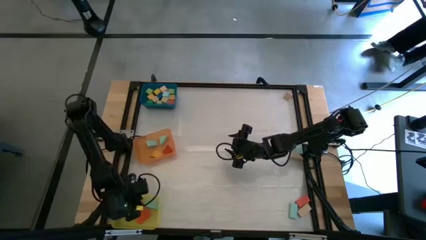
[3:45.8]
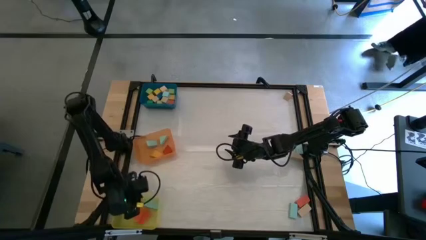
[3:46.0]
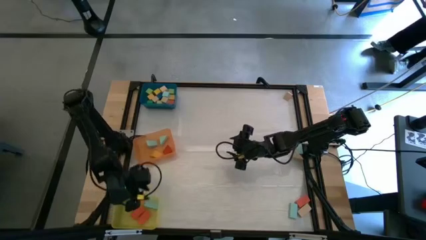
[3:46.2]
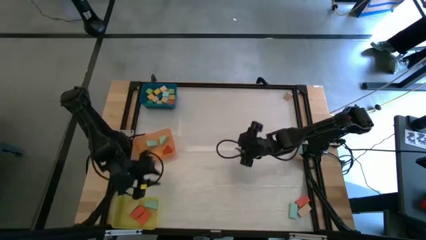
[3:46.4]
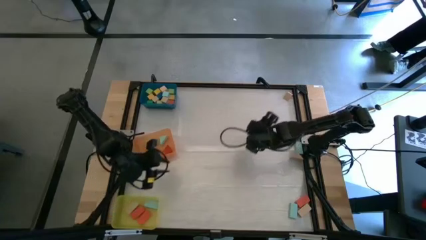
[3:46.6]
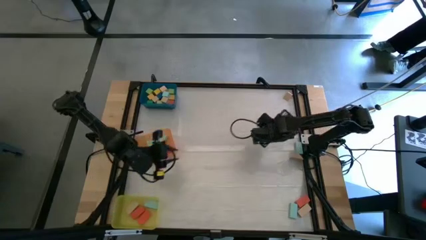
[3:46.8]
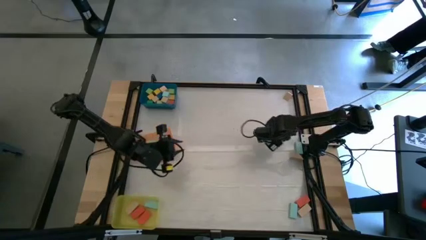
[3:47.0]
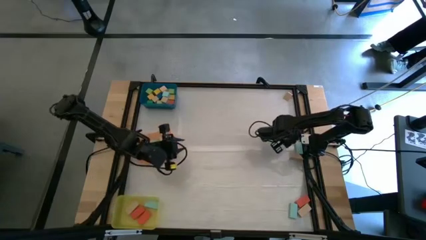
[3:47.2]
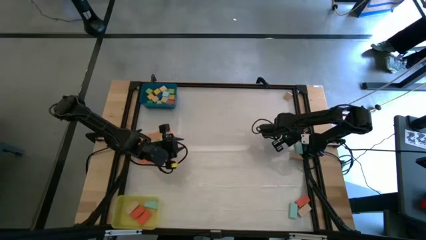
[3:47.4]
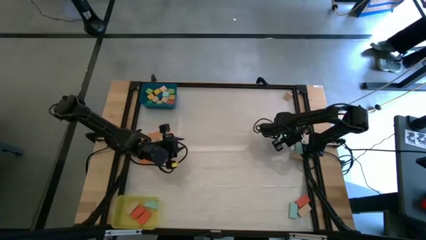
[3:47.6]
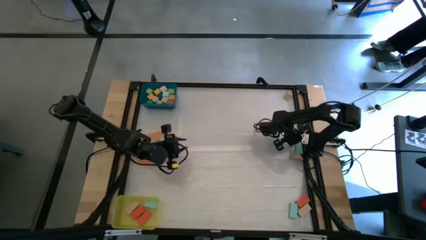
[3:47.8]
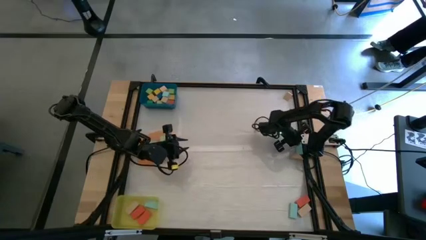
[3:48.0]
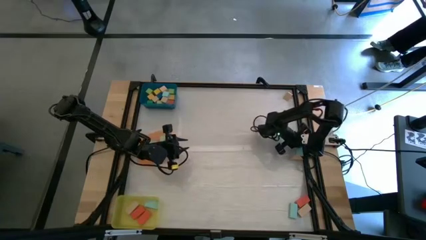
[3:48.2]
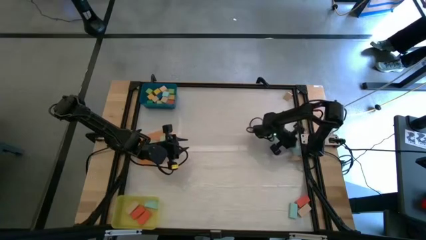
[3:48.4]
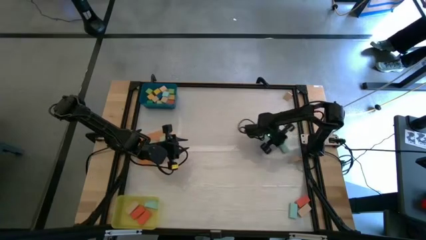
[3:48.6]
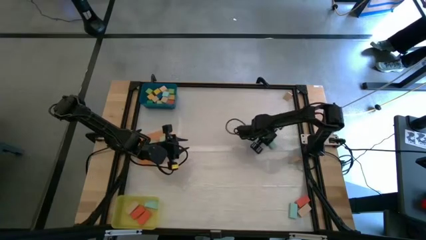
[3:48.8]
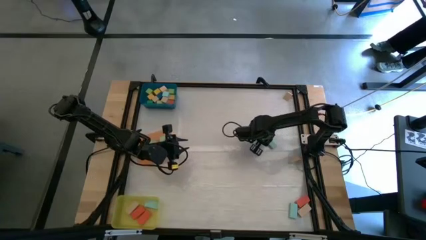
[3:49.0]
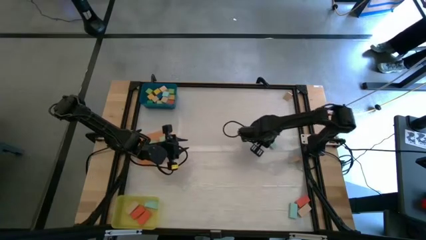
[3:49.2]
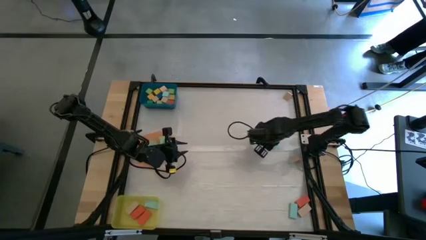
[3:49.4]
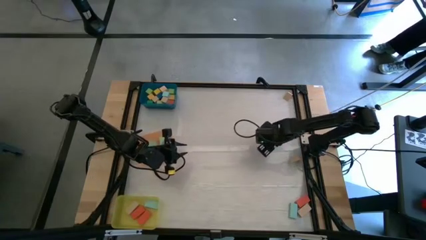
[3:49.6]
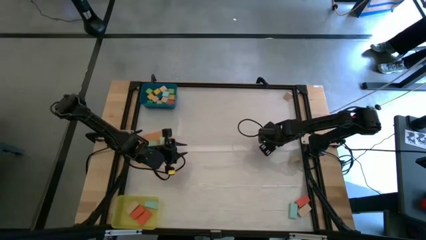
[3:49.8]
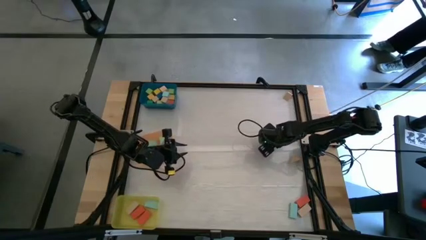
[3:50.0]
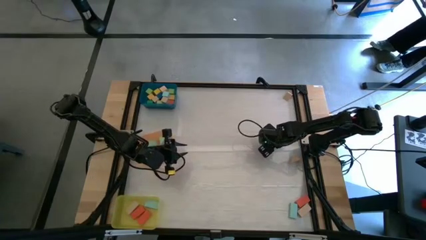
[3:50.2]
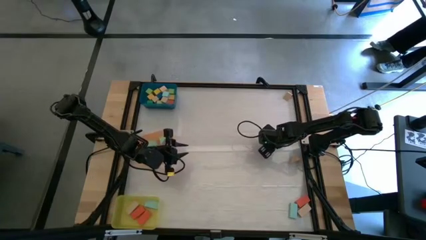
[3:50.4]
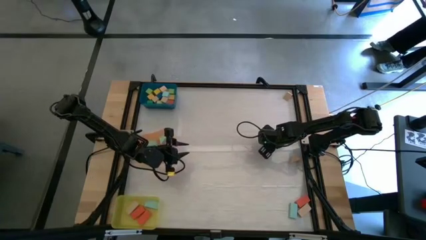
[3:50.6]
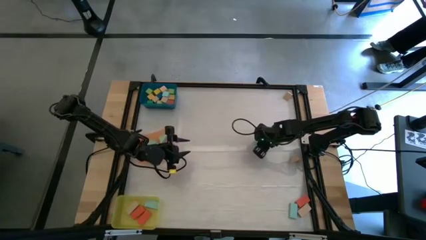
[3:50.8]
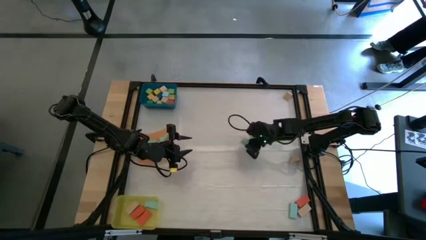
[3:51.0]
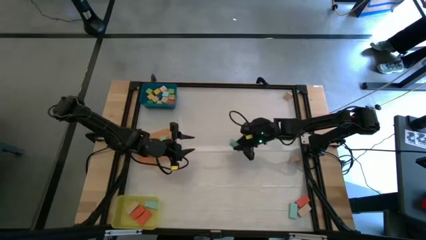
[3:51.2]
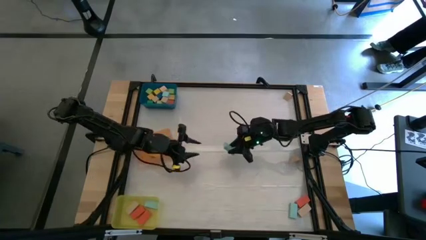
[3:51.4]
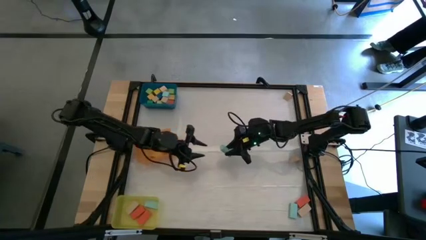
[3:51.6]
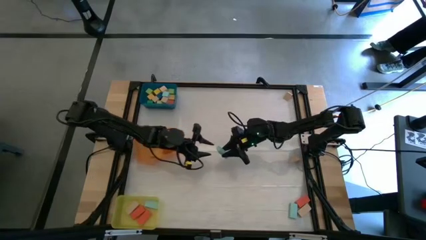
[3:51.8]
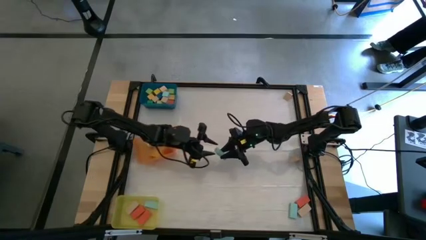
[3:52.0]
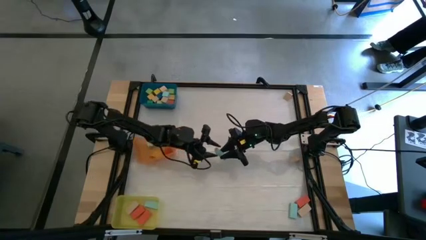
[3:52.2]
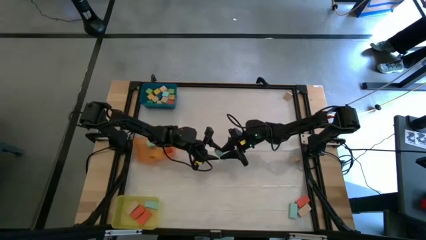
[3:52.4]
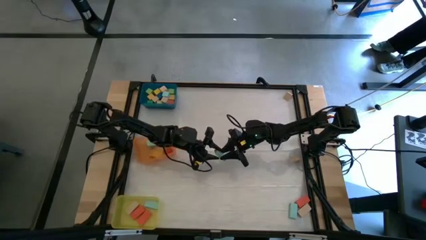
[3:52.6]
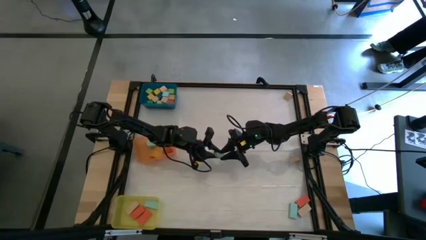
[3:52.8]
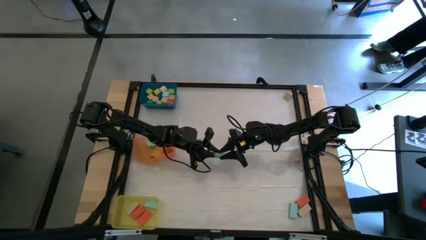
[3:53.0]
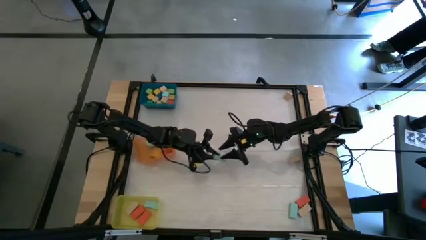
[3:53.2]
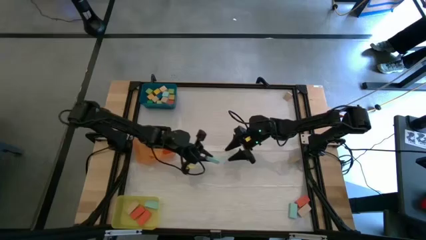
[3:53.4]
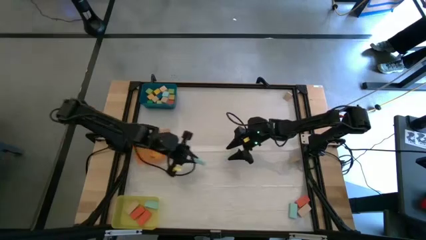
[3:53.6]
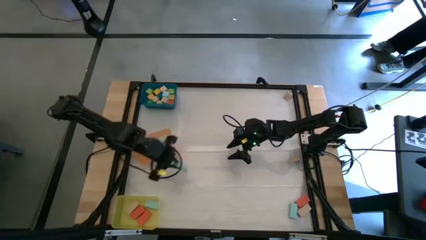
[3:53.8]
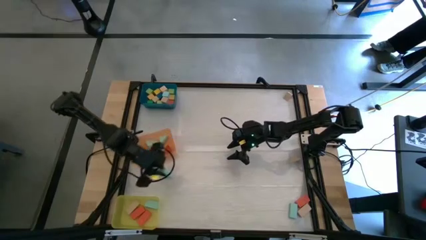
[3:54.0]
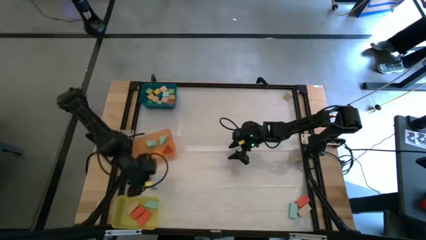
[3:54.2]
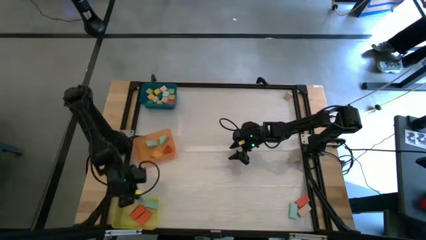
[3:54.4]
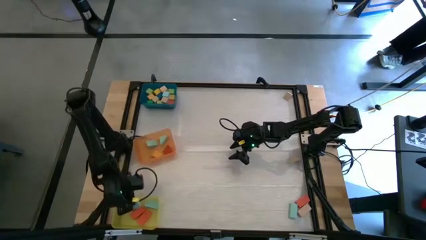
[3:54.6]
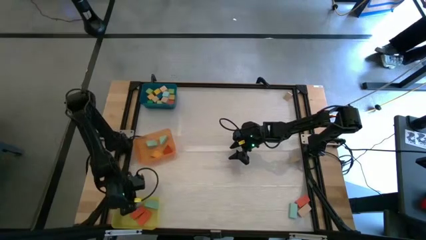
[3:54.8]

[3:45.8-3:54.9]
Task: Sort blocks by size
Put the light blue rectangular block into the yellow bin

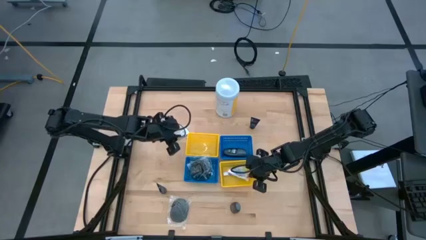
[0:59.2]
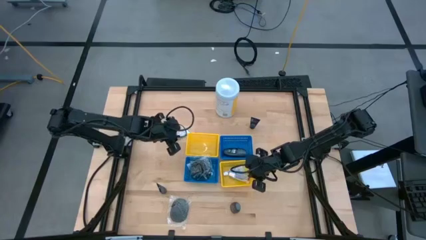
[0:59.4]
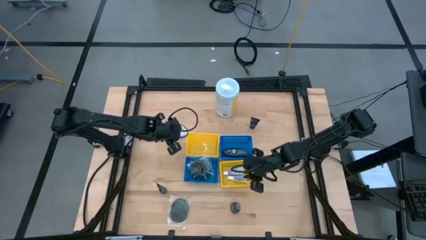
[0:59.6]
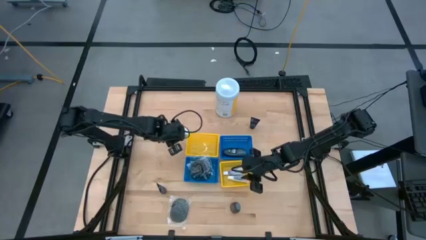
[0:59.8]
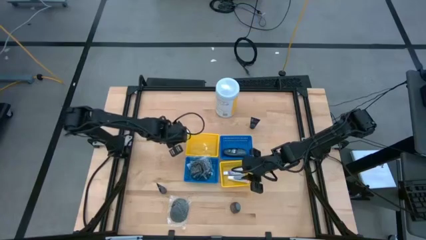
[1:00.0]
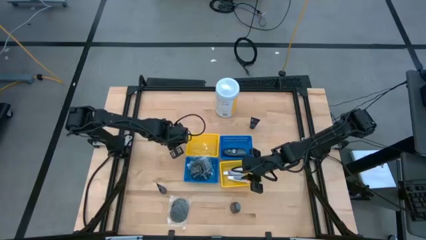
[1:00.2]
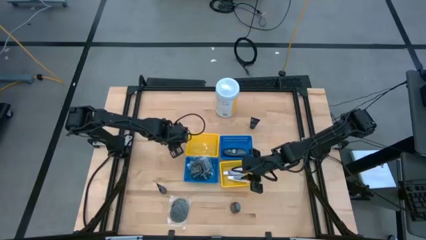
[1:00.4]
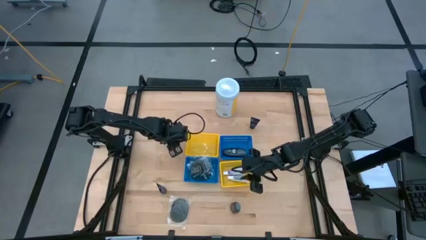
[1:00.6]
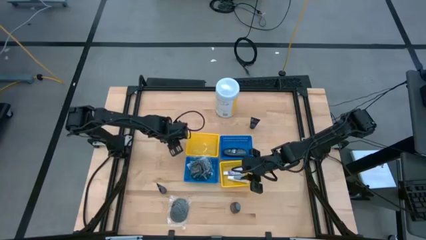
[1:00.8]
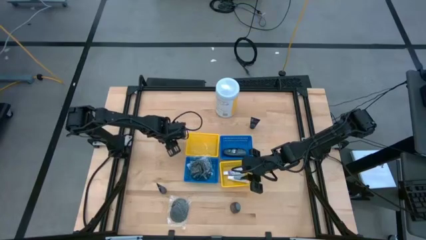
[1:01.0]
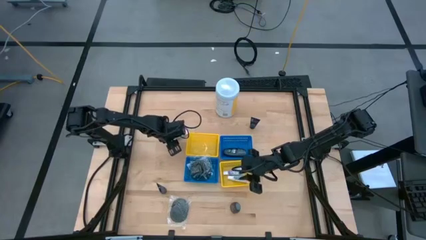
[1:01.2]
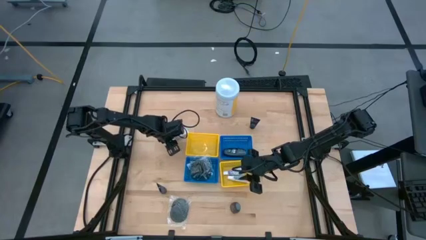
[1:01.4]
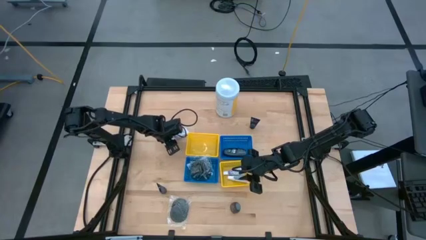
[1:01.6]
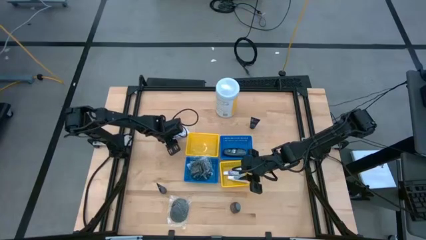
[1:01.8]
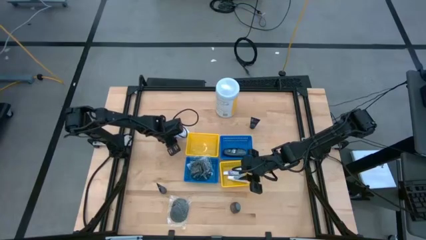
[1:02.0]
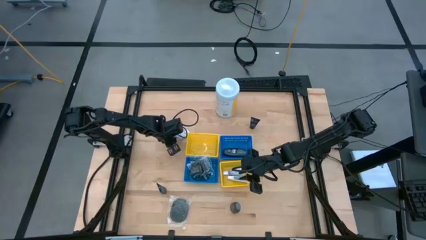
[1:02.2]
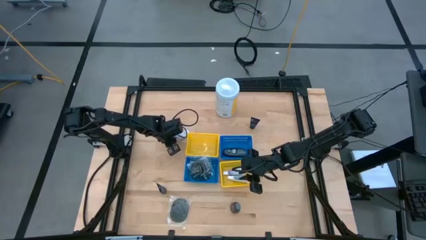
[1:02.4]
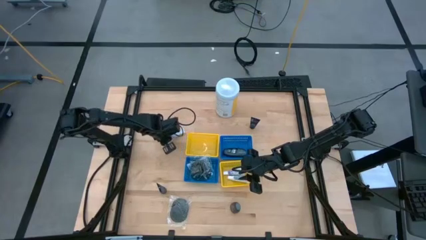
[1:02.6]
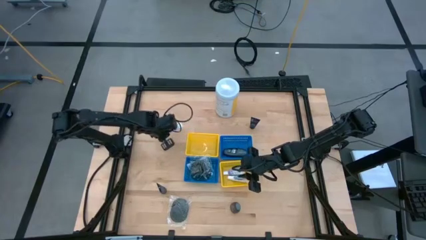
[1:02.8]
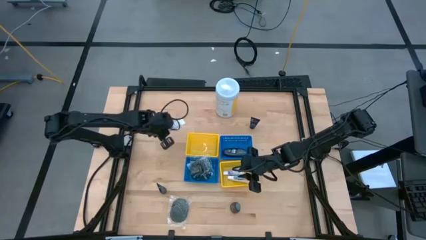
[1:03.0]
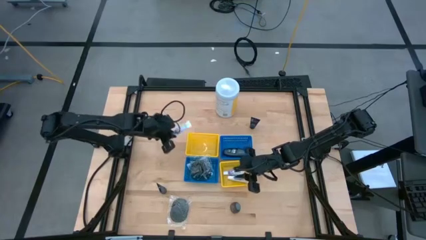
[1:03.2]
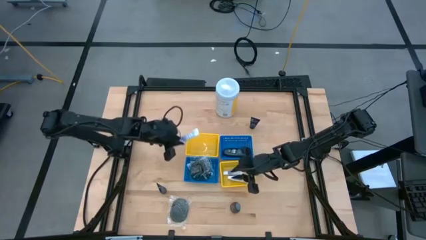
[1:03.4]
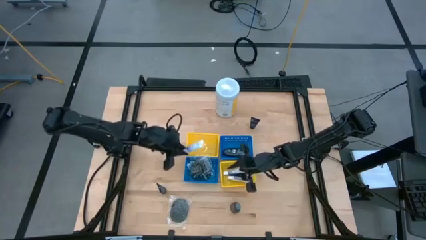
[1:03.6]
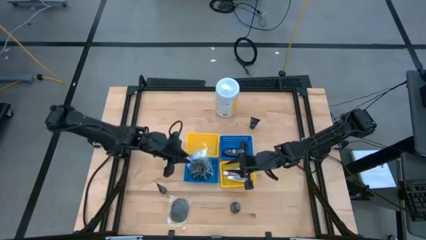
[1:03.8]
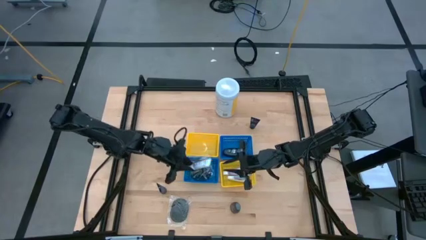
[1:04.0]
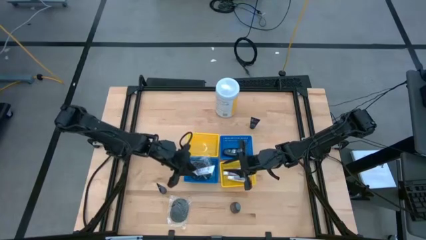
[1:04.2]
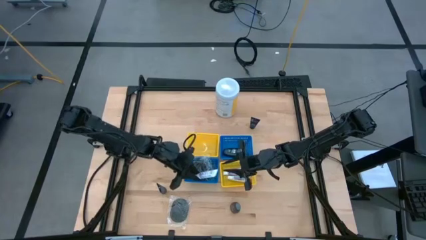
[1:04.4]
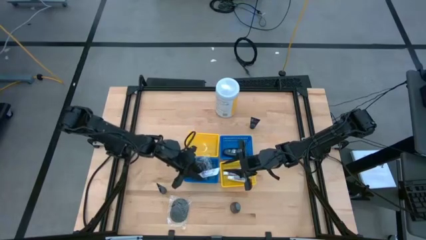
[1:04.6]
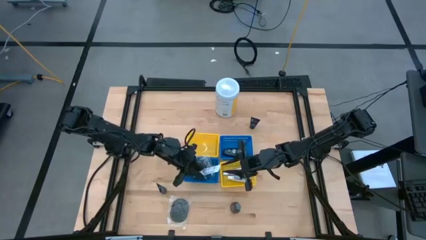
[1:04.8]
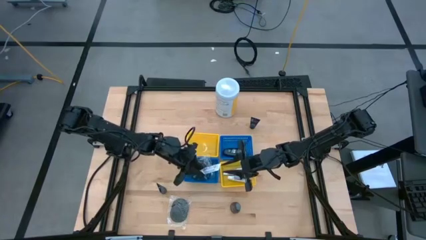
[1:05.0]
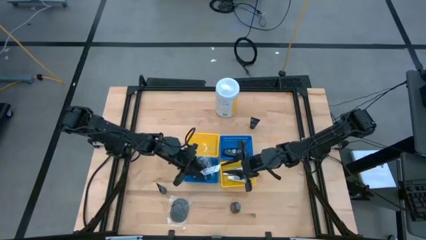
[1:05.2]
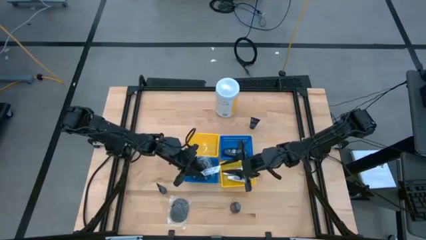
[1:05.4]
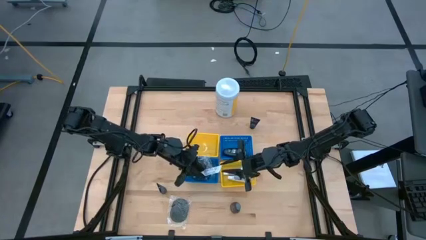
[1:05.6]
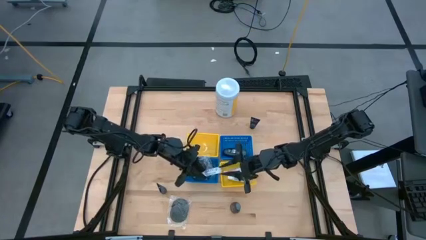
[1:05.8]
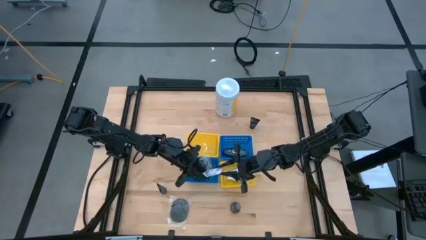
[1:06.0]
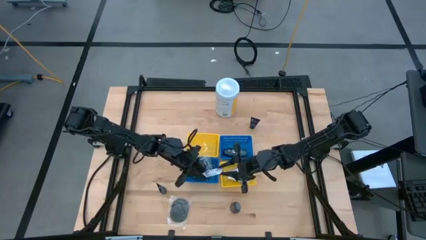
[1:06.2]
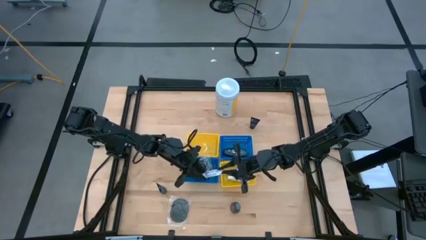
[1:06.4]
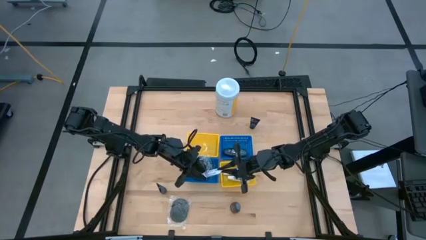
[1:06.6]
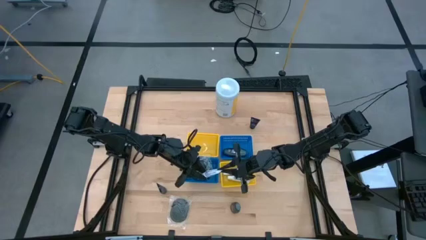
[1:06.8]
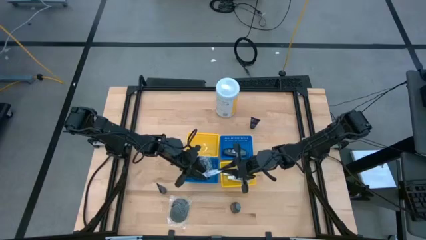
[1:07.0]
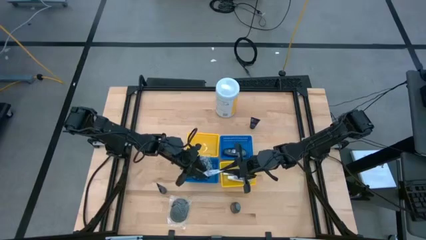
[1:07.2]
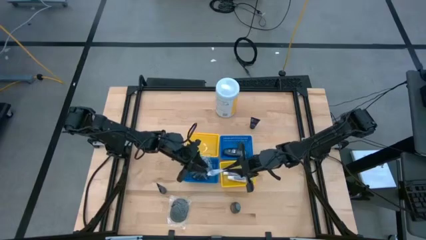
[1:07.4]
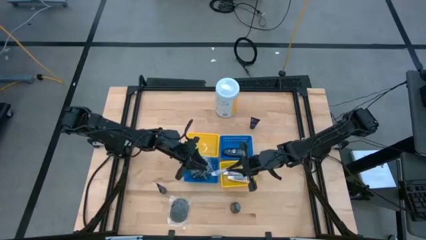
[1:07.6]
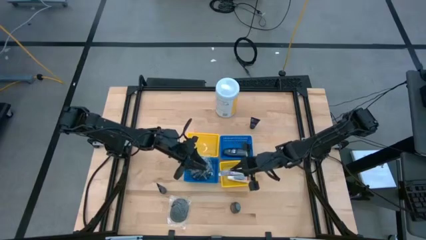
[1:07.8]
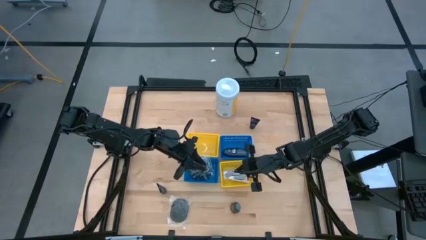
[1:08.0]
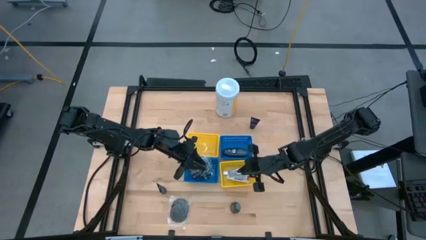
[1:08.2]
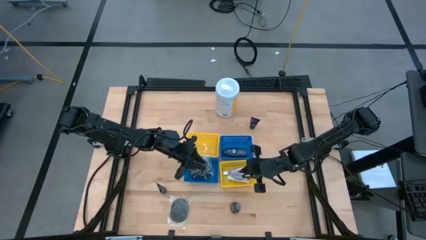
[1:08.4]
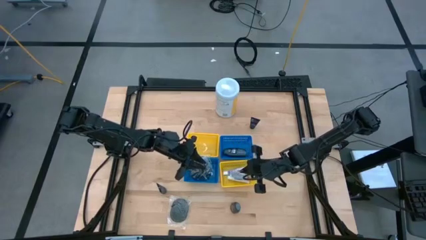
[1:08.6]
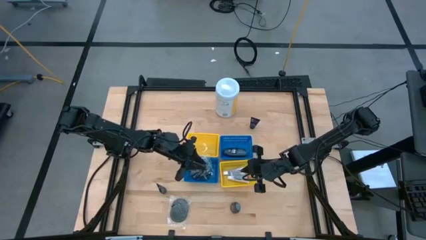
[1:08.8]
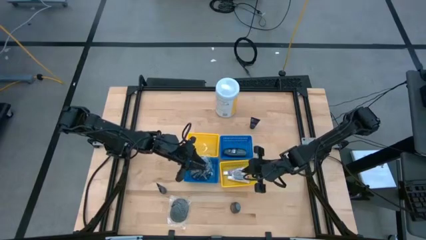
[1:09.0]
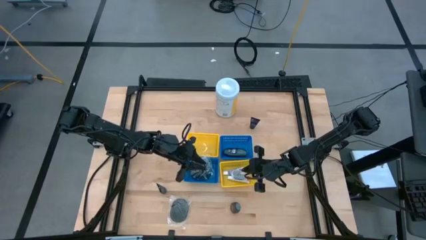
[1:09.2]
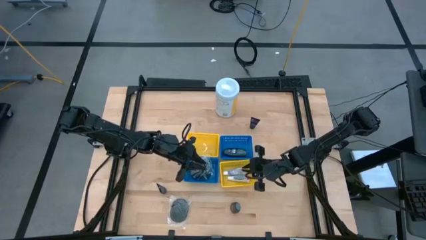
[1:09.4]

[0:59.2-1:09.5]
Task: Pick & Place Travel size toiletries
Put the white toothpaste into the bottom yellow bin
